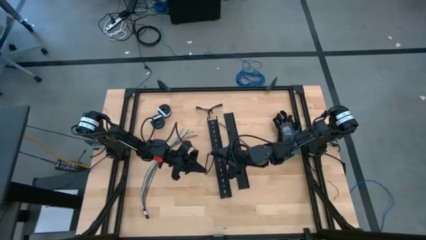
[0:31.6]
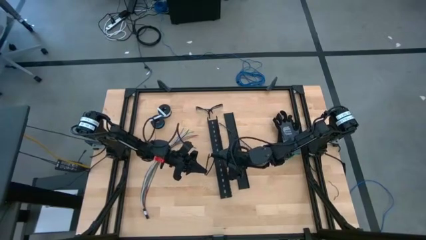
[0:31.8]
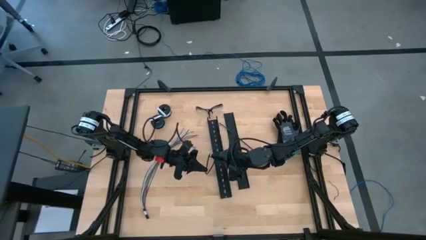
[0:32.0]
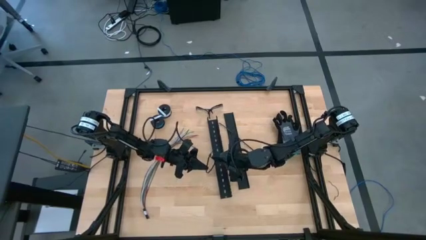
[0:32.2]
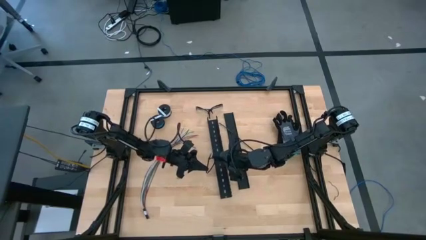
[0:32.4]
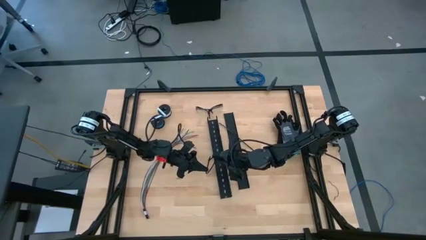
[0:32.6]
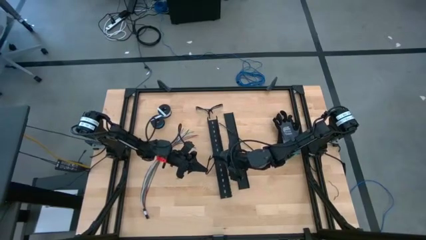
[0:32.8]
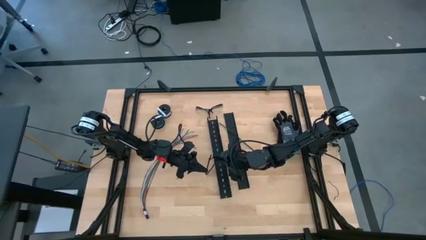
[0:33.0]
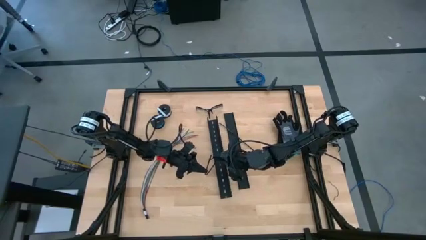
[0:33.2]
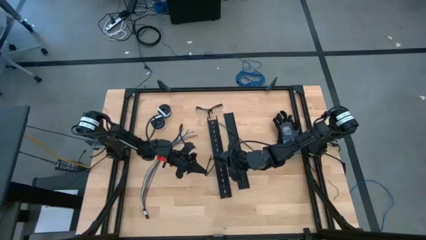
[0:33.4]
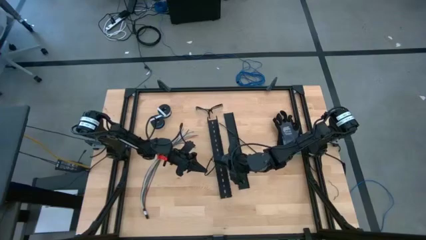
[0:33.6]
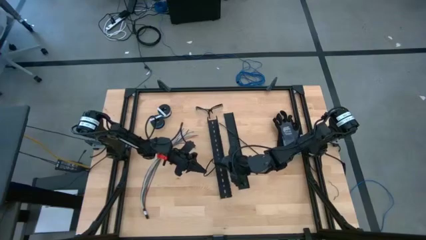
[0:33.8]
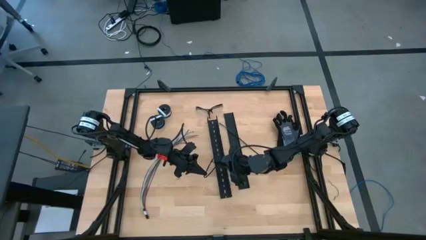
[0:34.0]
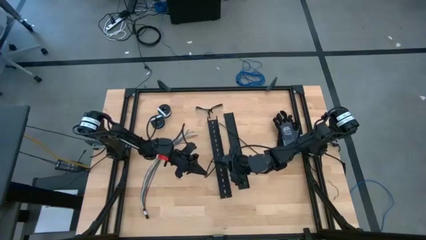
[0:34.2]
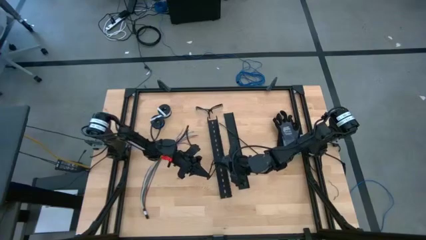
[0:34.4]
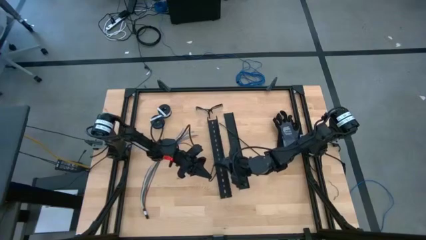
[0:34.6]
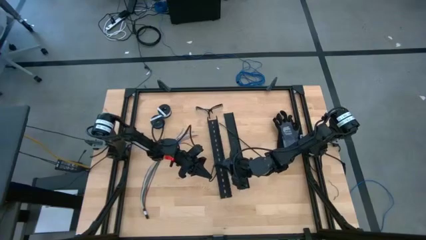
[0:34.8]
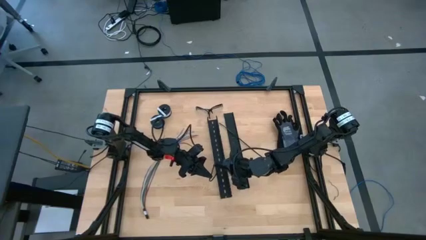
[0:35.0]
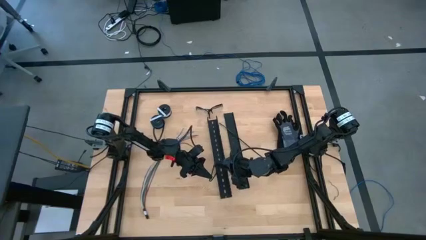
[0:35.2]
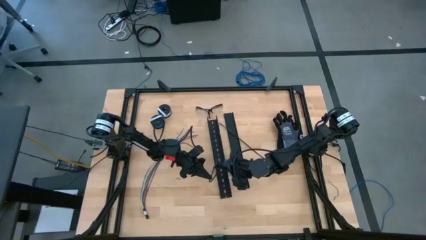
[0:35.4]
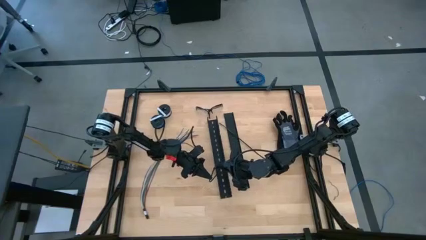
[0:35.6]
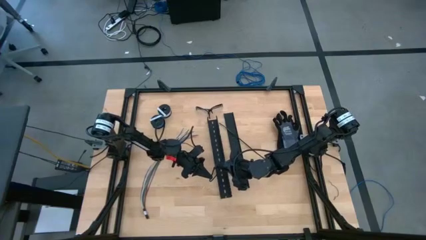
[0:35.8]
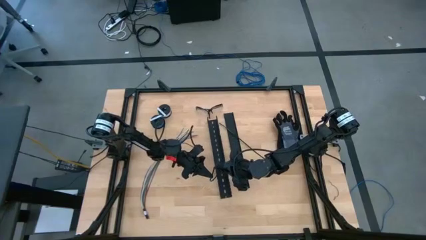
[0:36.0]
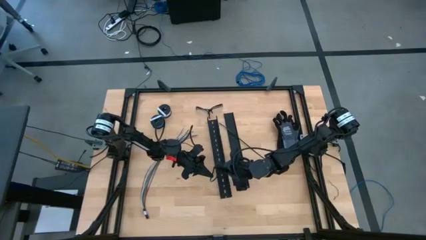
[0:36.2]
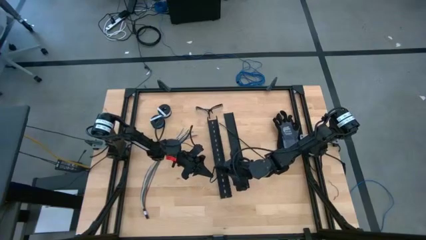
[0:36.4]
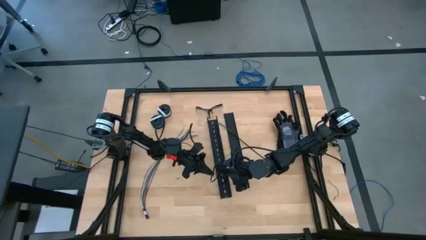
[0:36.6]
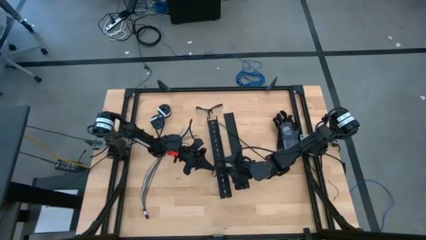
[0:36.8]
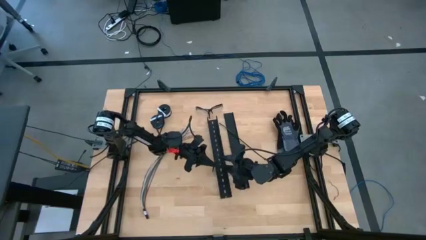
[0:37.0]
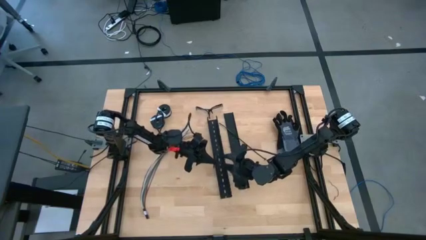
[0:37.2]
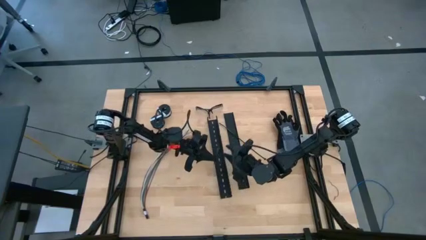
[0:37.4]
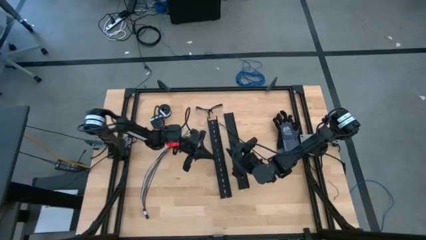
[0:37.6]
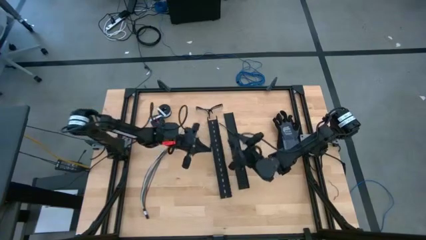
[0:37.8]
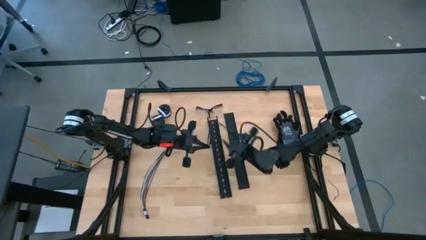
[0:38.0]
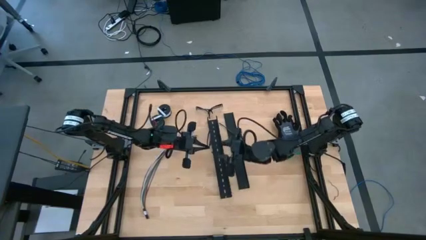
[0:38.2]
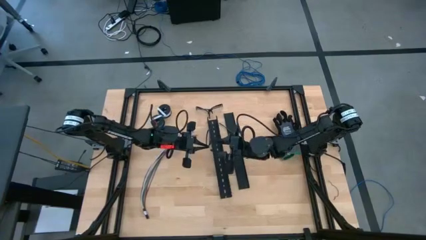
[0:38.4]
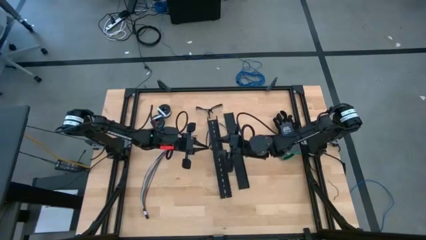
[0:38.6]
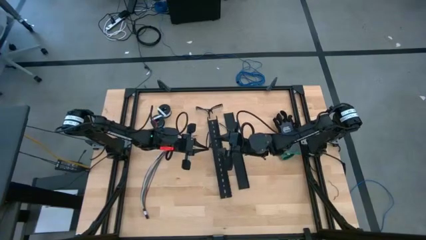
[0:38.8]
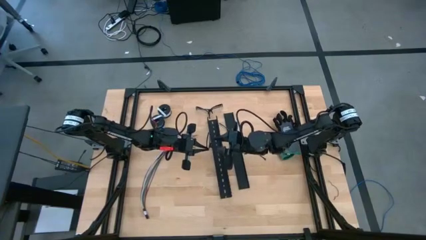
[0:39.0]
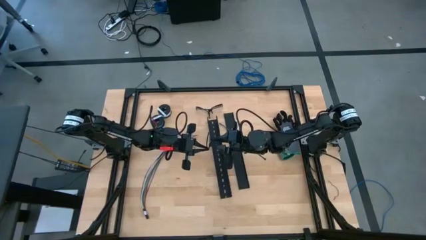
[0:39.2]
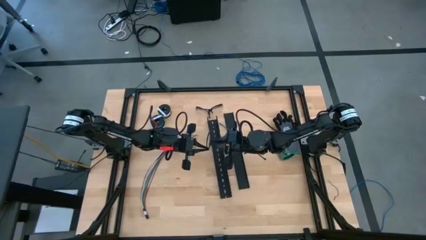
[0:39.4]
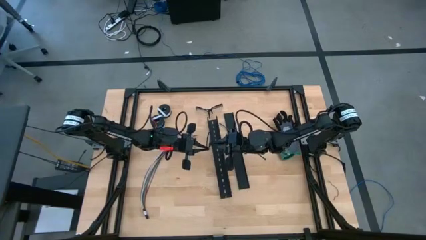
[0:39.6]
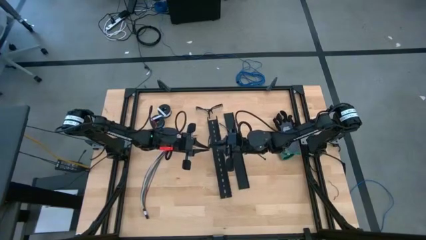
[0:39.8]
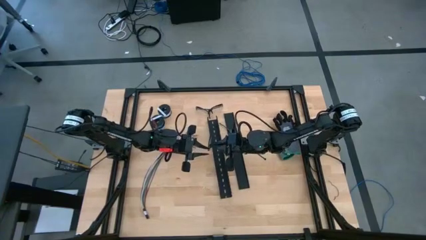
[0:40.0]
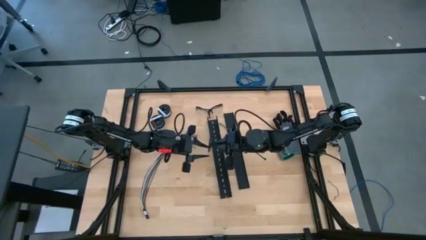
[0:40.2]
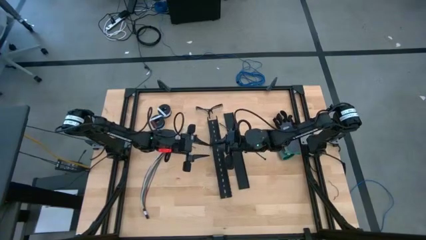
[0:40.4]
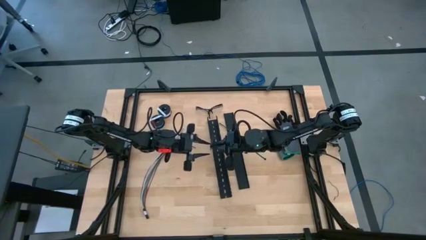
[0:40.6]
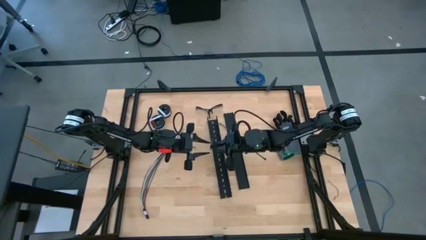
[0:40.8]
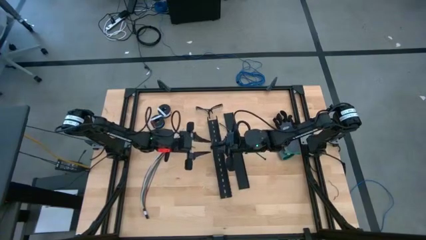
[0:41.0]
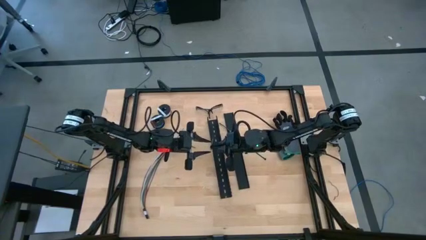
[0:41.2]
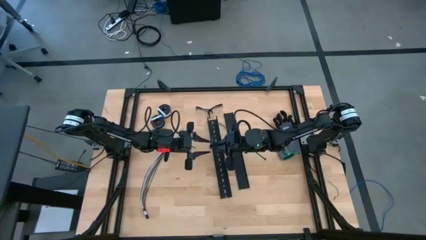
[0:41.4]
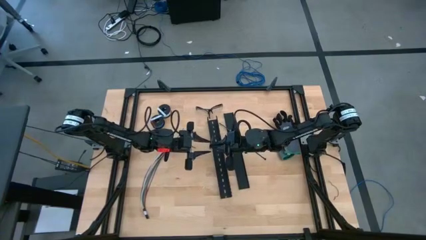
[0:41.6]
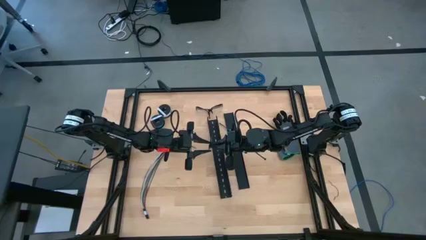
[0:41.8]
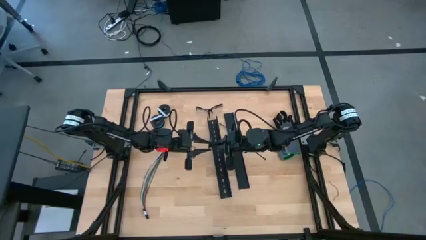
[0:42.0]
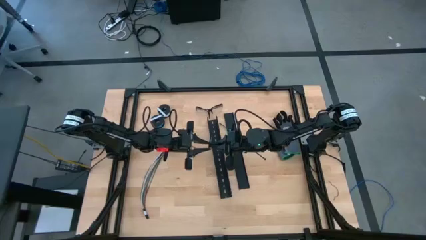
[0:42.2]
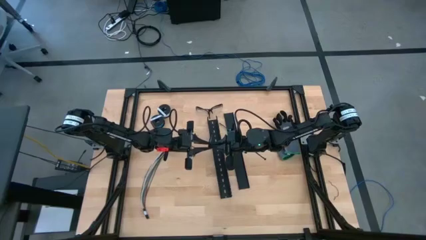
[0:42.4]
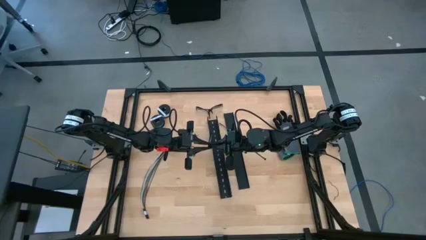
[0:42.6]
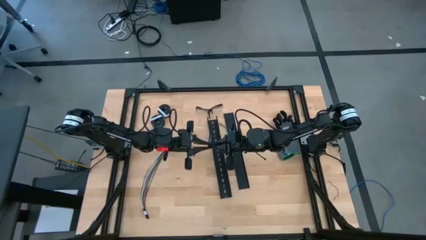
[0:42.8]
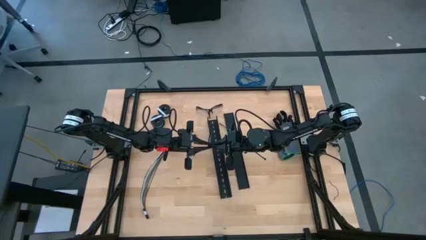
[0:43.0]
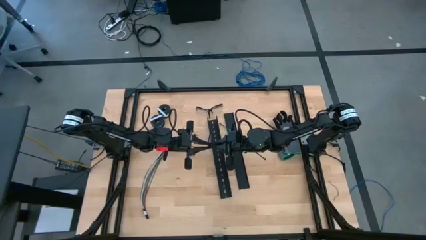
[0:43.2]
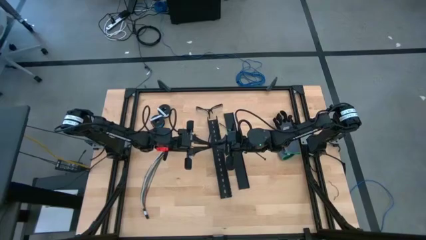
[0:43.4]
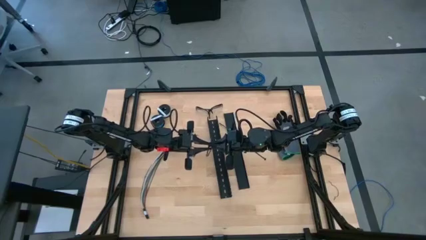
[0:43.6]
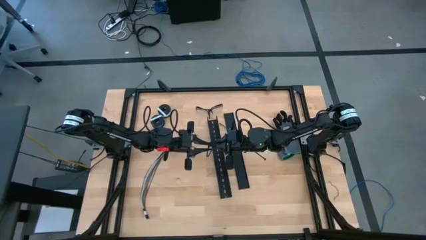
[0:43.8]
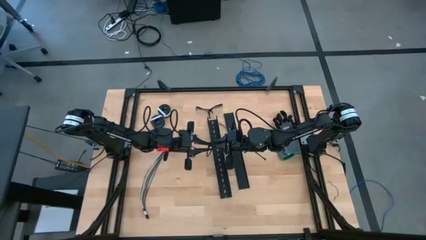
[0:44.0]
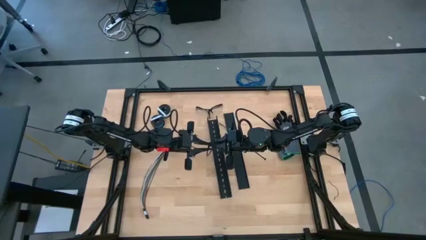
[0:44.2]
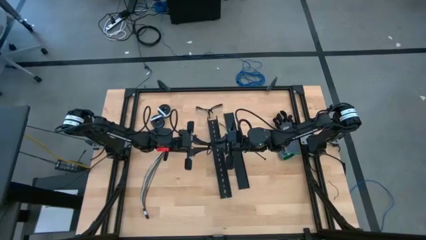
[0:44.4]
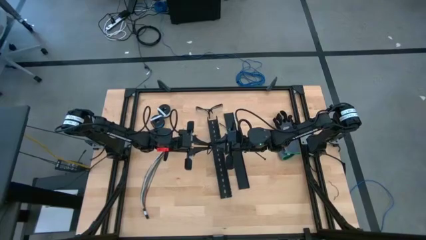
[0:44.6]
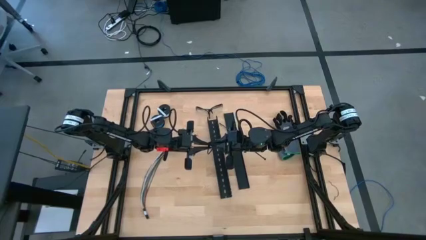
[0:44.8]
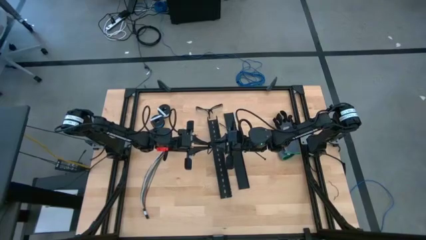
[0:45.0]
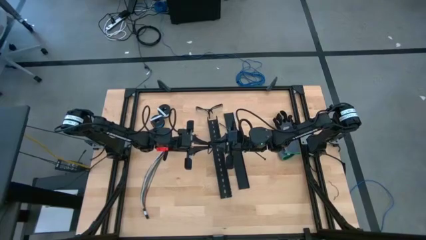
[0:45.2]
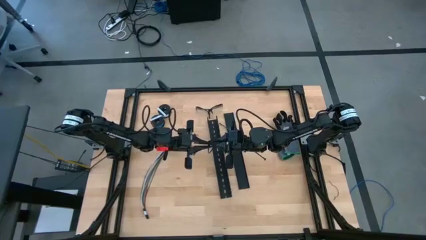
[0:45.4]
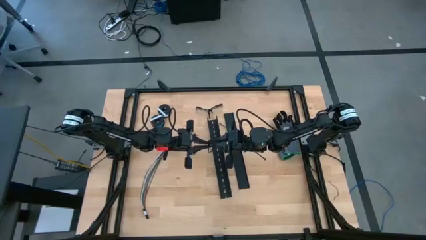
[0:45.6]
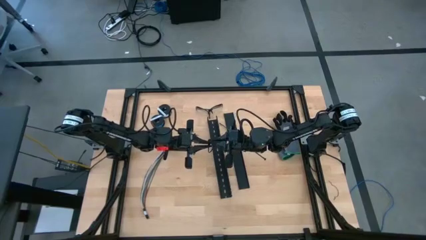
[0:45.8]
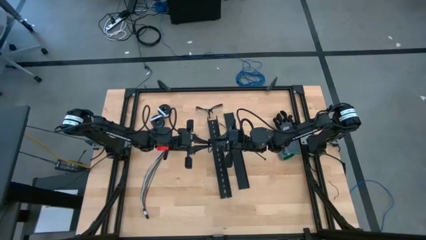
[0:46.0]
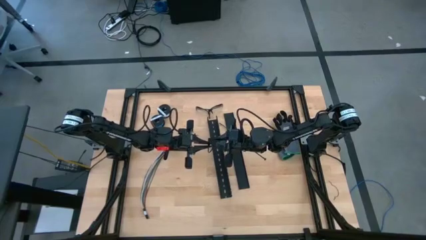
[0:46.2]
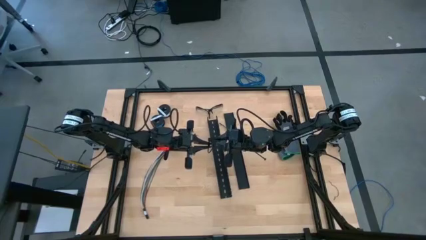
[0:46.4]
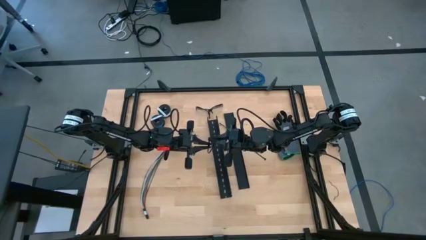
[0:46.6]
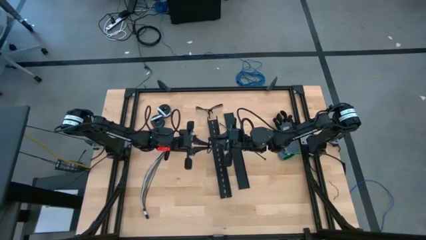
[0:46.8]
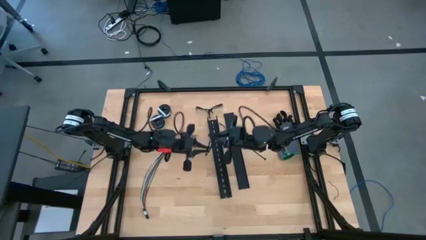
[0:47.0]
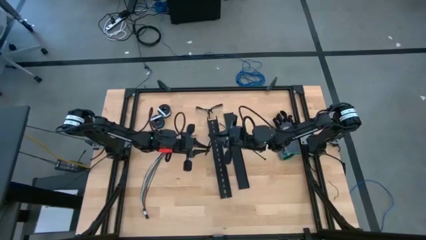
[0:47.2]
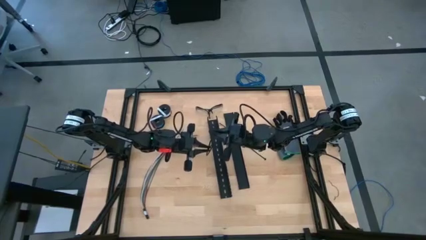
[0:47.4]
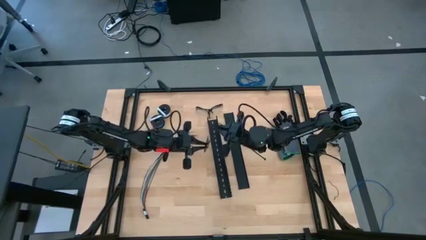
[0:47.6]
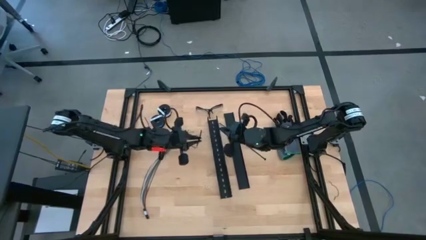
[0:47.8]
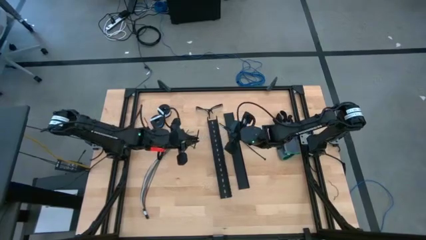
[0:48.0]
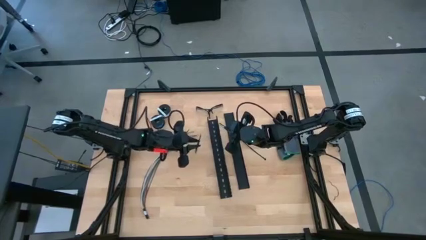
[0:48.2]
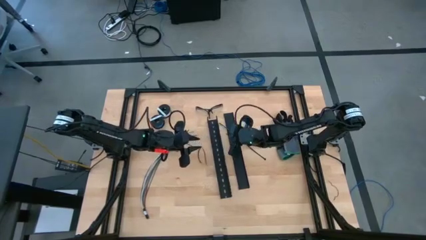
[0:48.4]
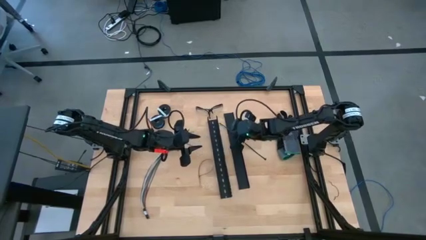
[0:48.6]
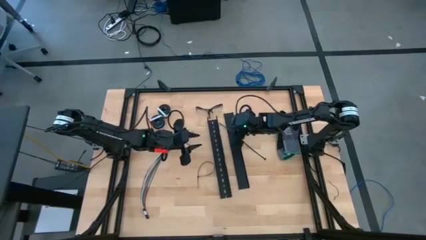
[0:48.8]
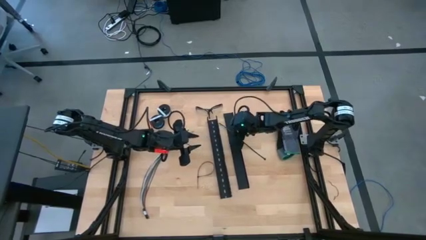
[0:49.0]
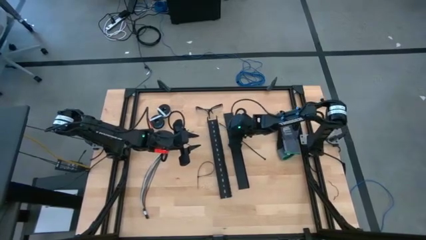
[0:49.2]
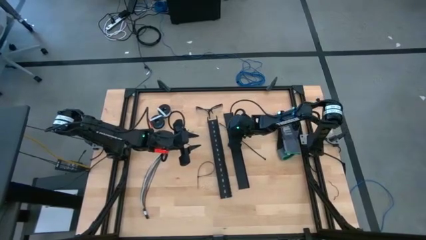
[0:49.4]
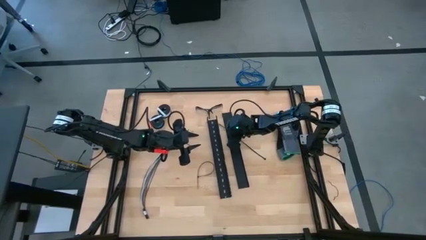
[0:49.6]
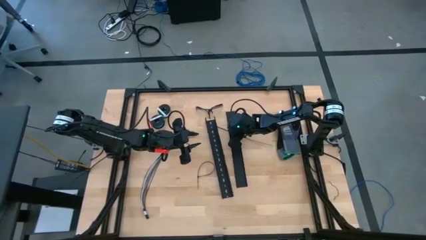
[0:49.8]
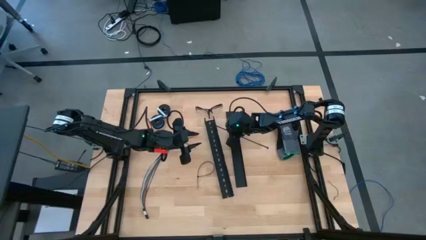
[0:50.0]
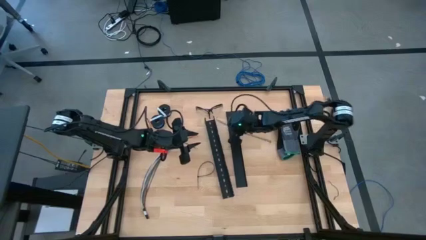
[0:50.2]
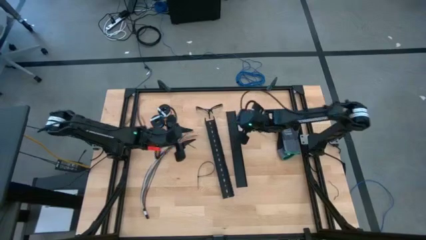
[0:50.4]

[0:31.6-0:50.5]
Task: Ziptie cables
Wrap the black zip tie on the cable
